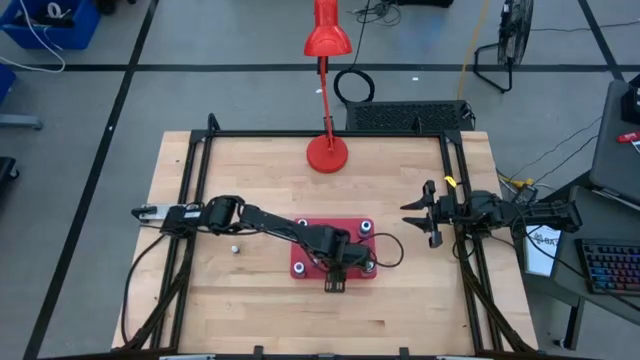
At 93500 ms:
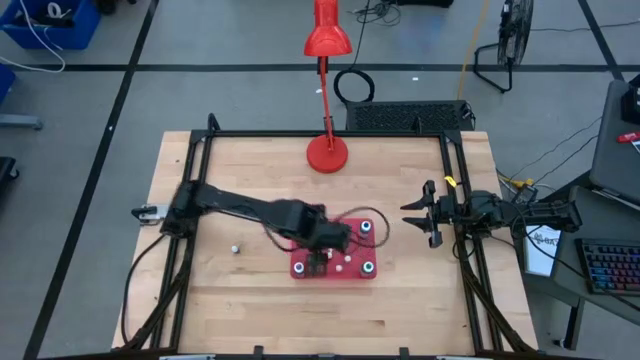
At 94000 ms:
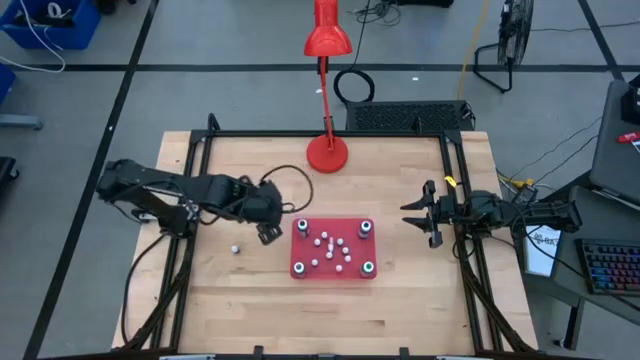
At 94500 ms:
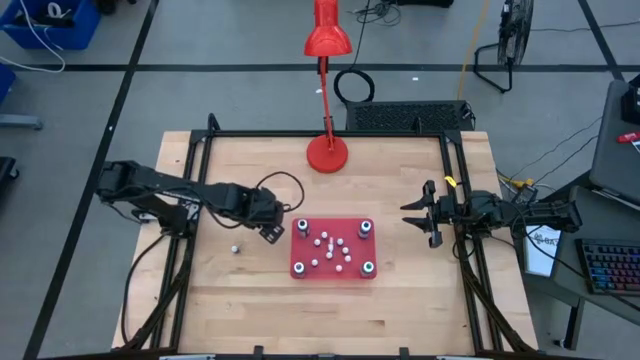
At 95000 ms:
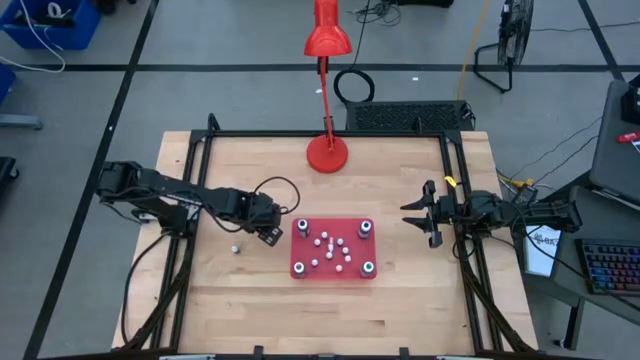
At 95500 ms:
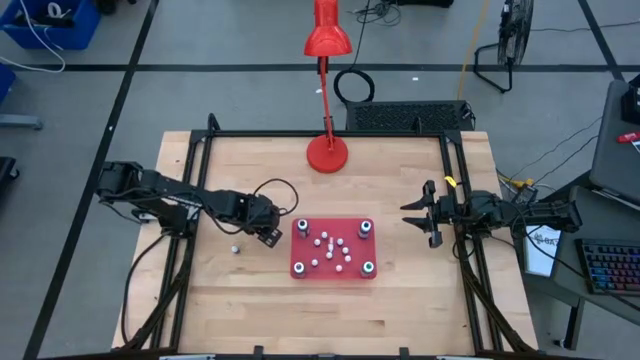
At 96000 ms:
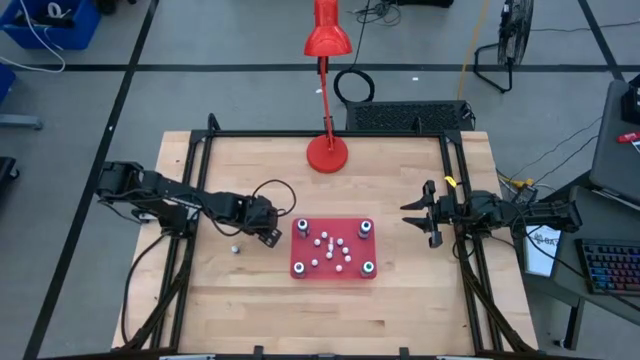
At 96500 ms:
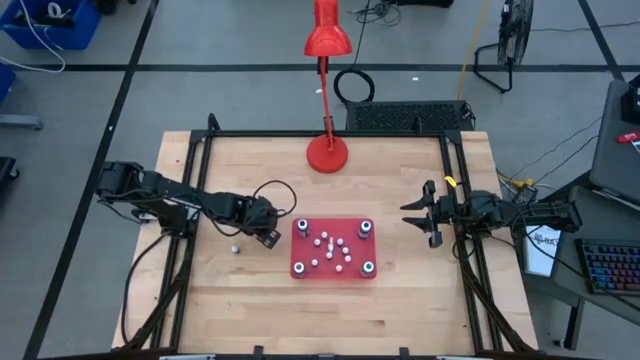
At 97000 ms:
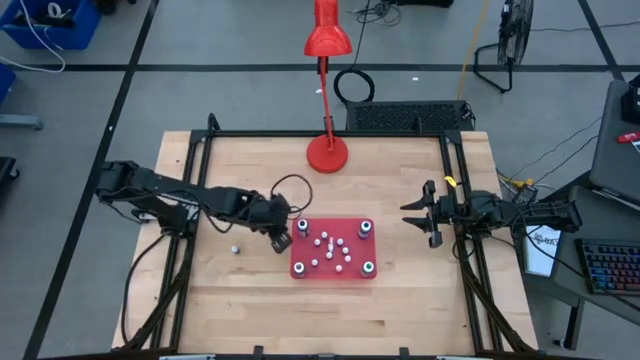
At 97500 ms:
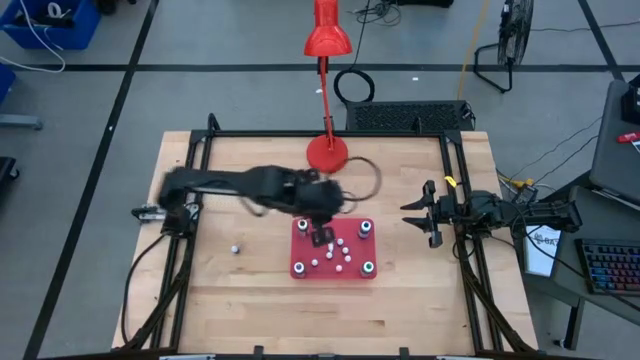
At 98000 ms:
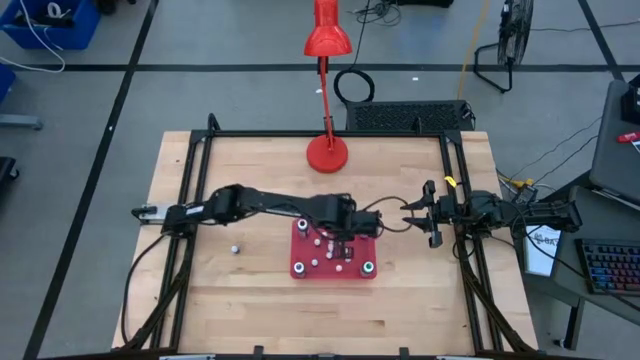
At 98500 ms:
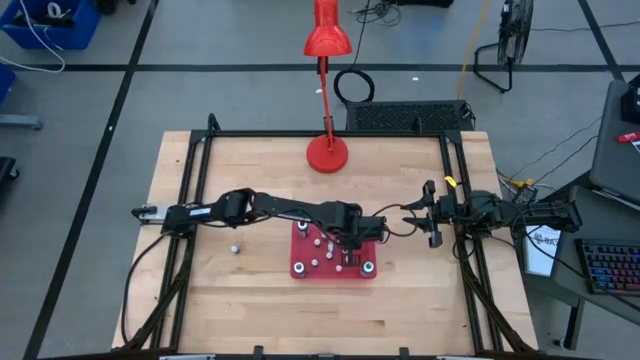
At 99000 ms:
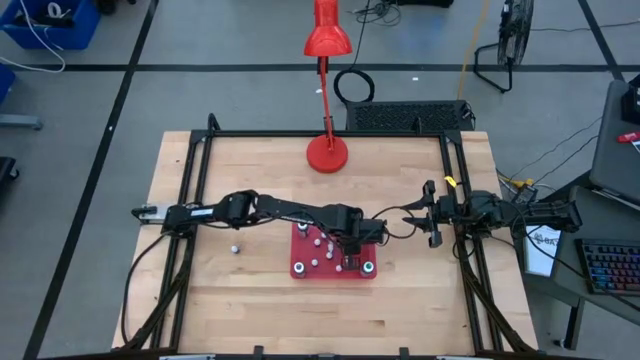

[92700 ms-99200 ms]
Task: Pick & Place food coloring
Put the small orange food coloring bottle into the pink bin

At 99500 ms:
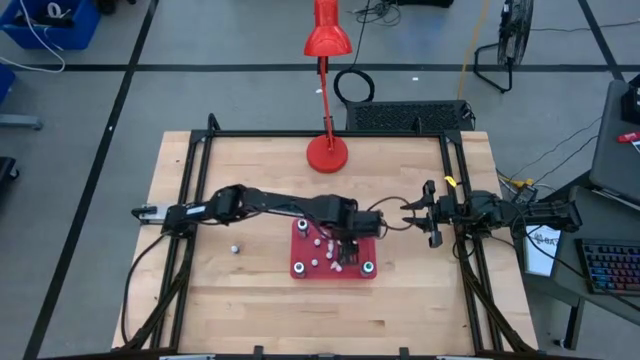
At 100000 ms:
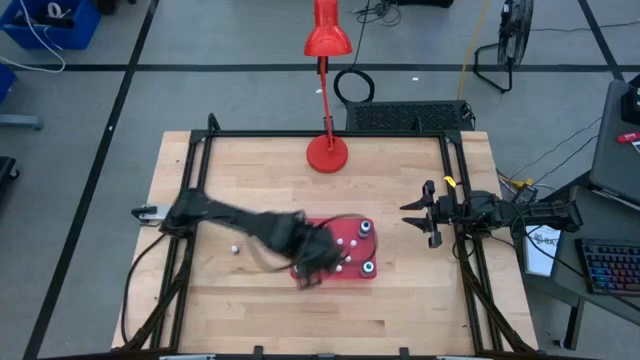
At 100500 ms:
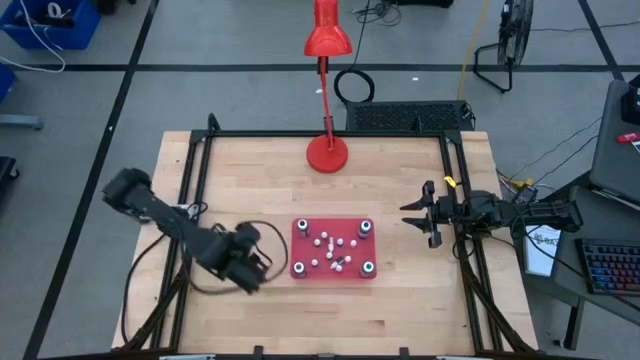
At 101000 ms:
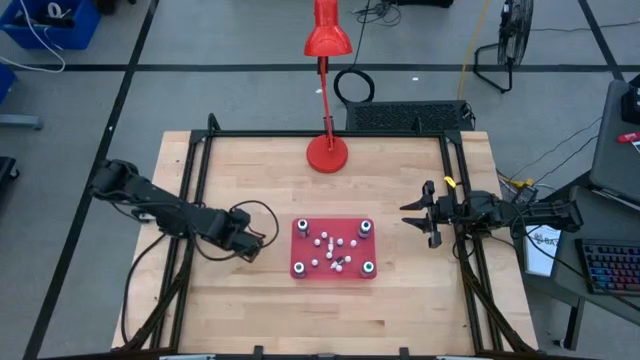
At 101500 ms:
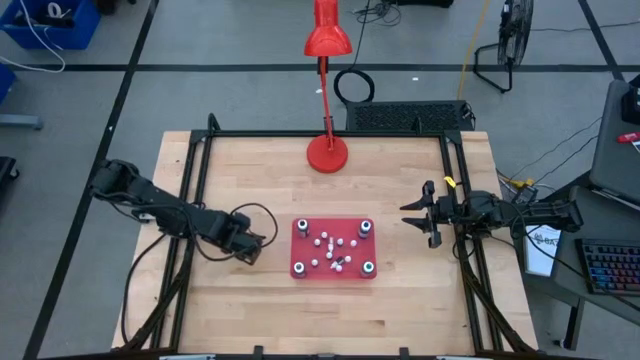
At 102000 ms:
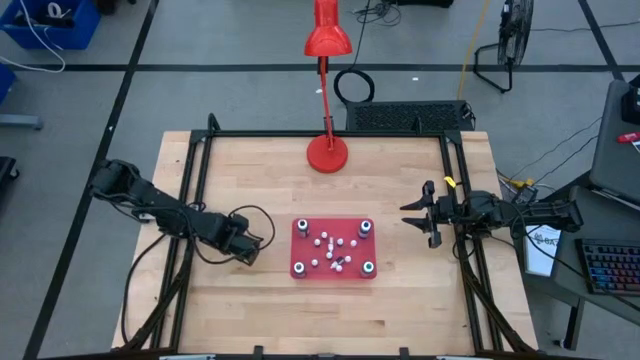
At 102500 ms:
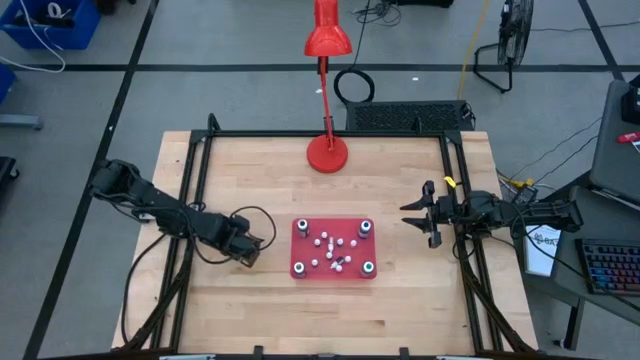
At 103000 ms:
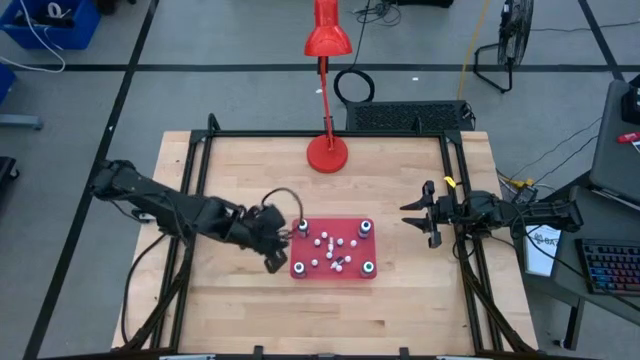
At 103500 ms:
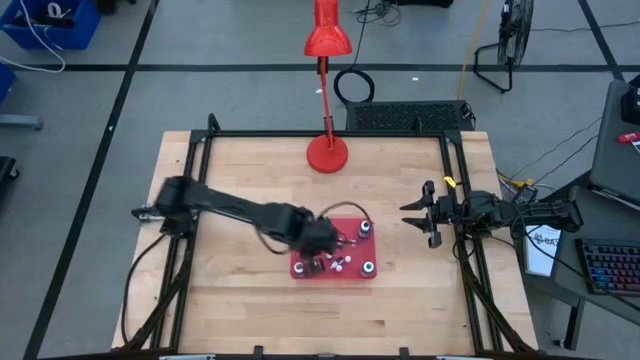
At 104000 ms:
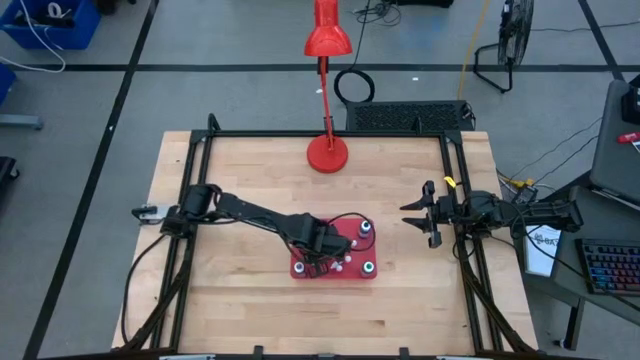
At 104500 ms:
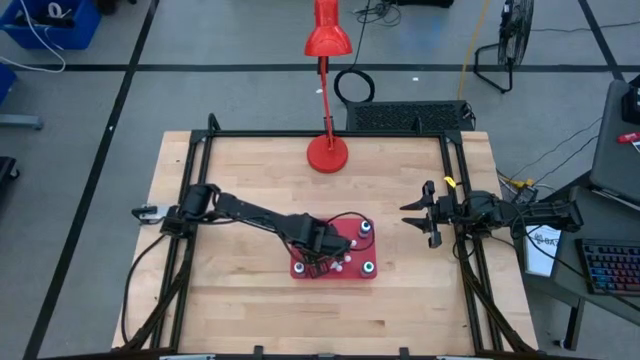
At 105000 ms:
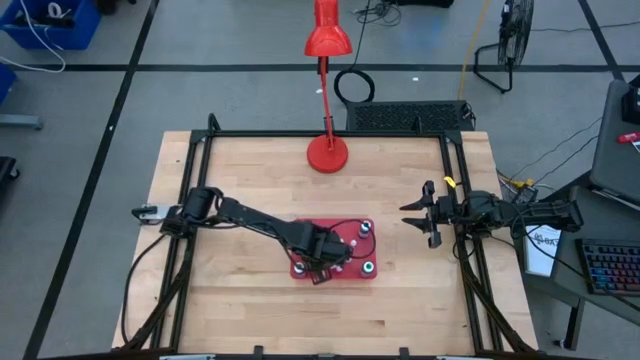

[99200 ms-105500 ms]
Put the small blue food coloring bottle into the pink bin

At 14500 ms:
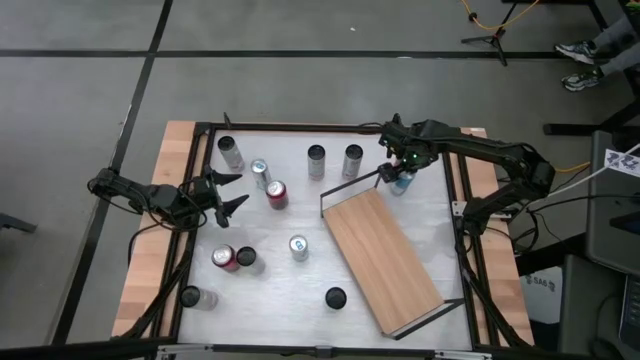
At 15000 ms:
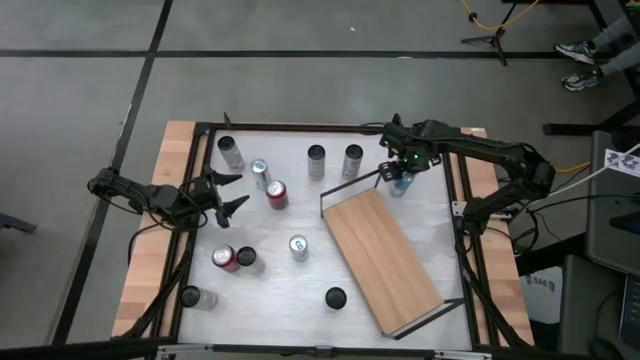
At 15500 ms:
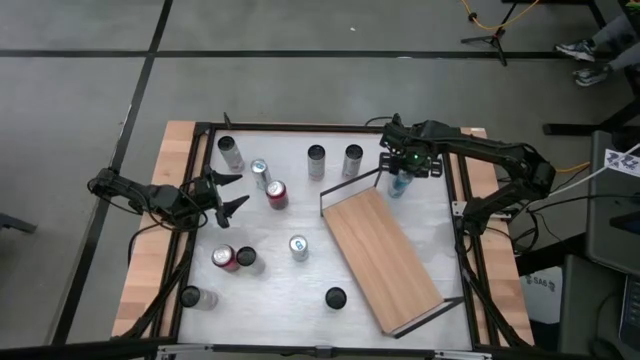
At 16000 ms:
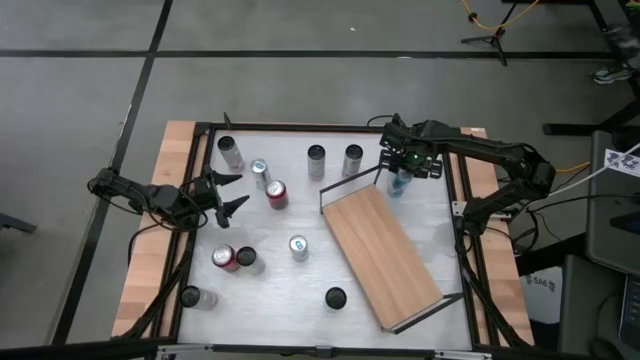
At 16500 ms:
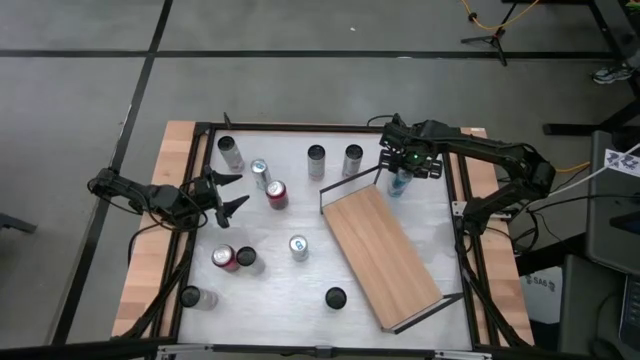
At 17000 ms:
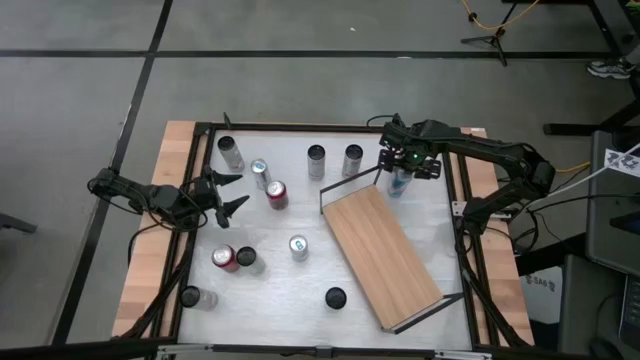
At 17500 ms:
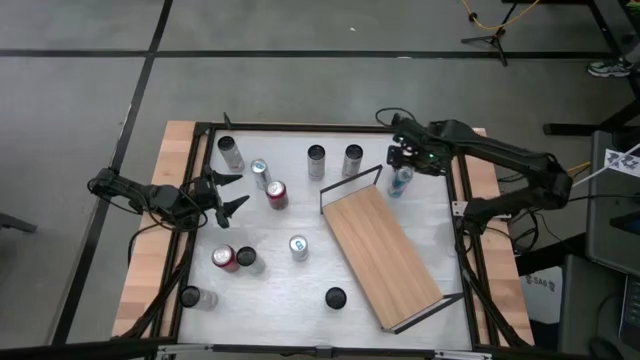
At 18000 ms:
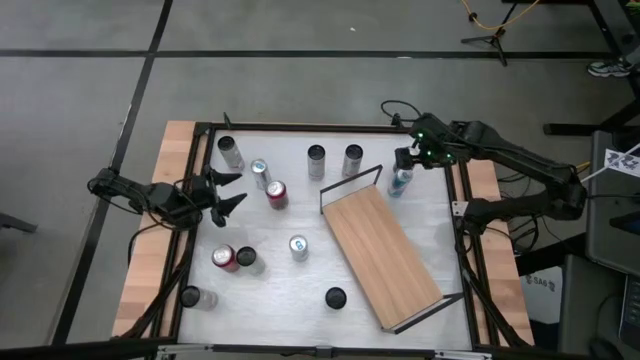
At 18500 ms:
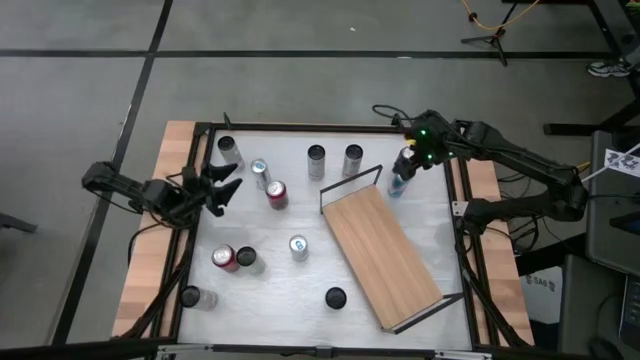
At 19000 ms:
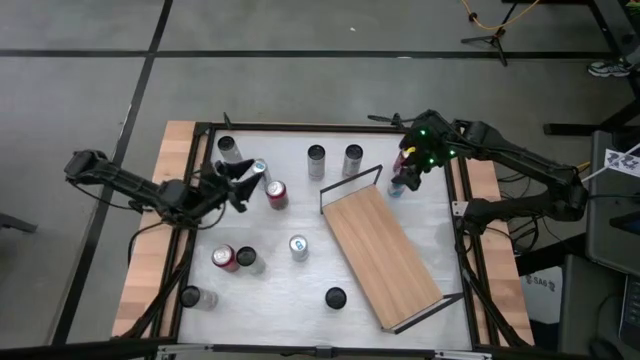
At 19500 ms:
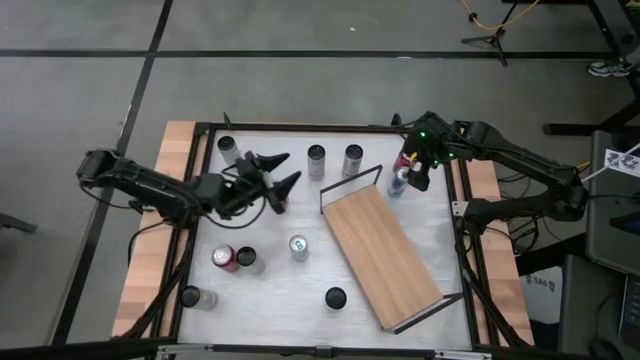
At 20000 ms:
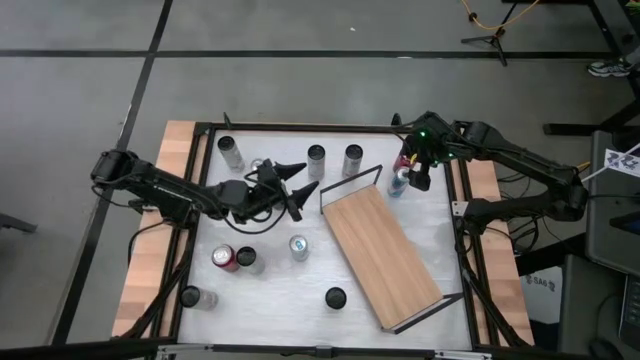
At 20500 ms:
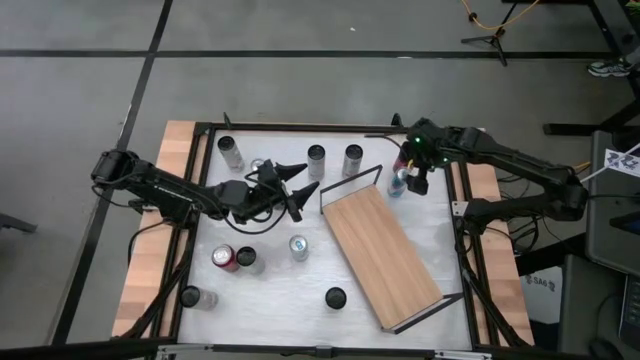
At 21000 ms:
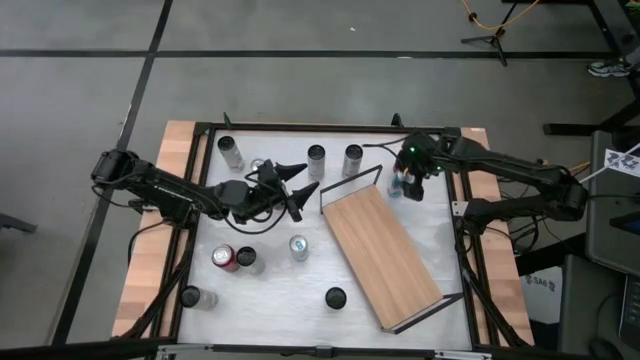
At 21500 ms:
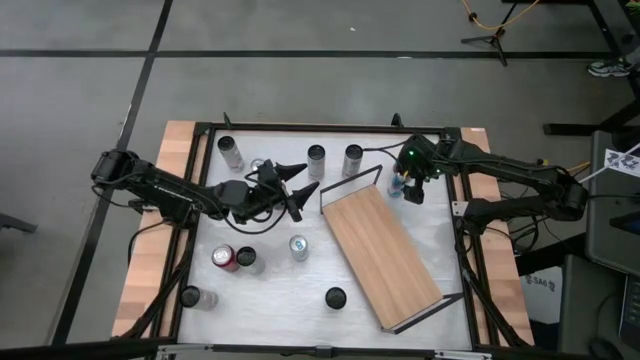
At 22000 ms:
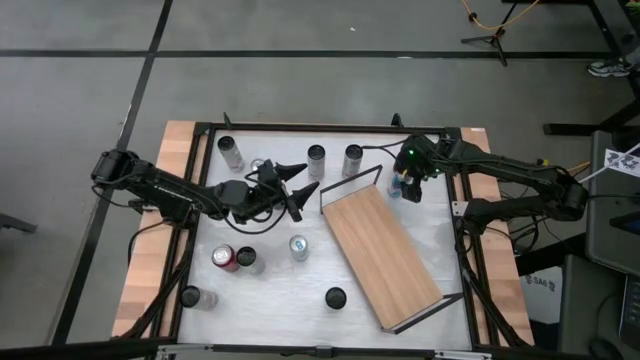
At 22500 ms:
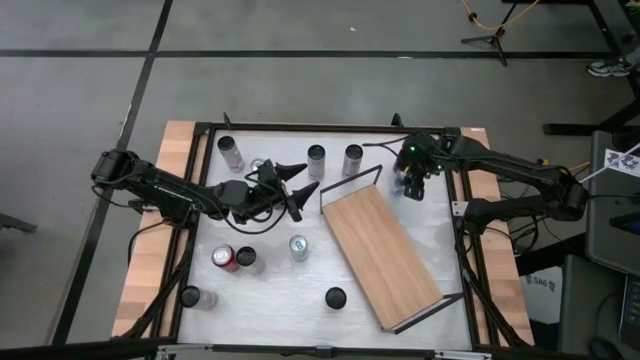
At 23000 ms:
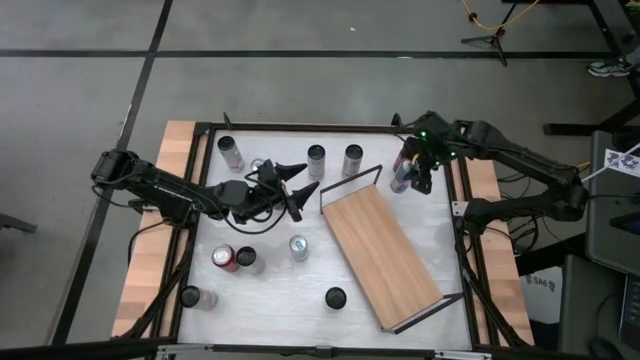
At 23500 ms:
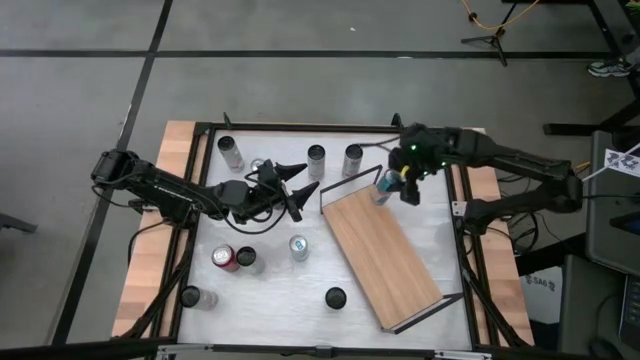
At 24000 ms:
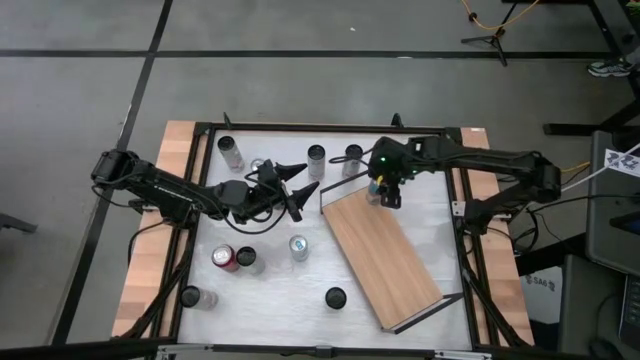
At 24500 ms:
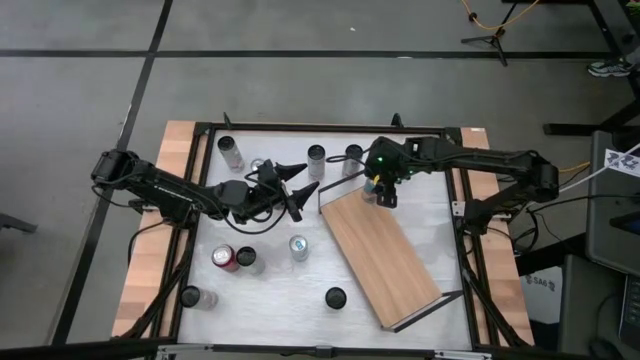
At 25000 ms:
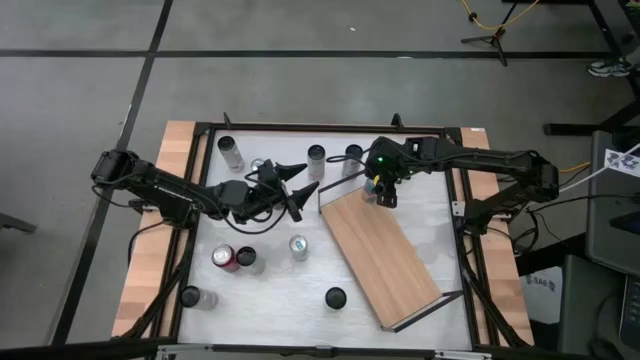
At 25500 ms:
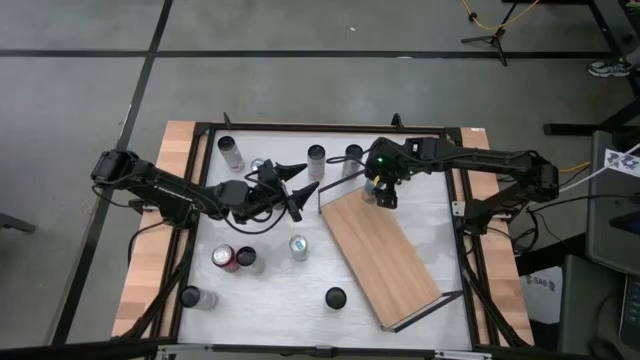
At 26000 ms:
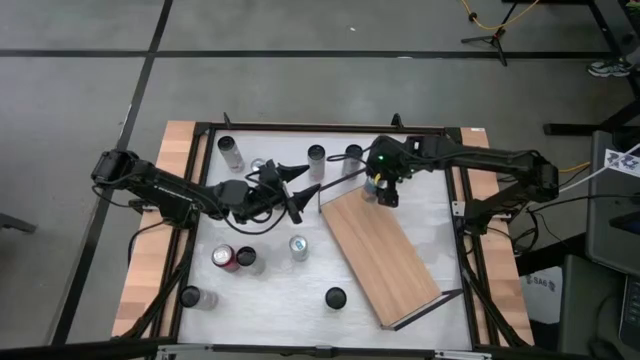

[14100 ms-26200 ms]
Task: Place canned beverage on shelf
Put the blue soda can on the shelf
